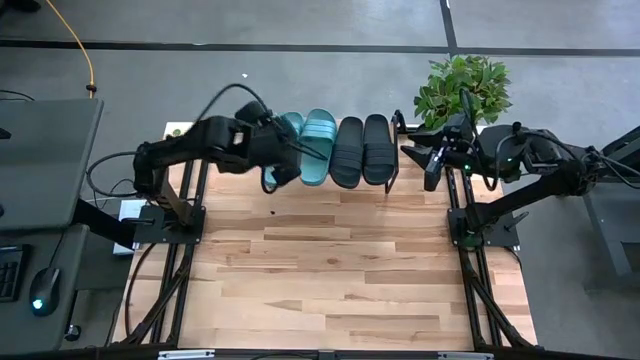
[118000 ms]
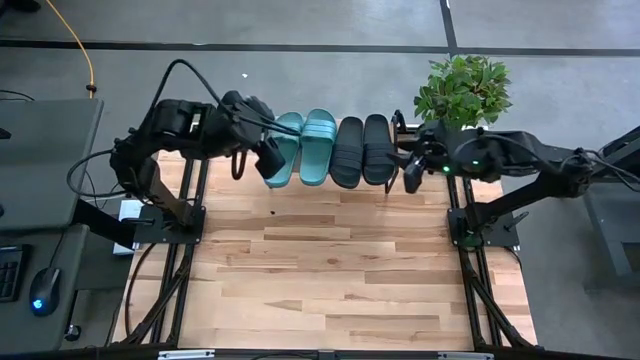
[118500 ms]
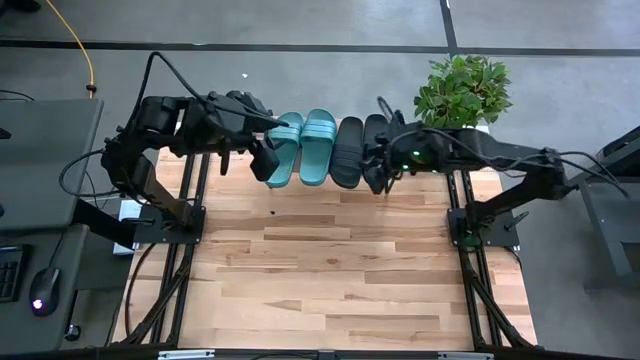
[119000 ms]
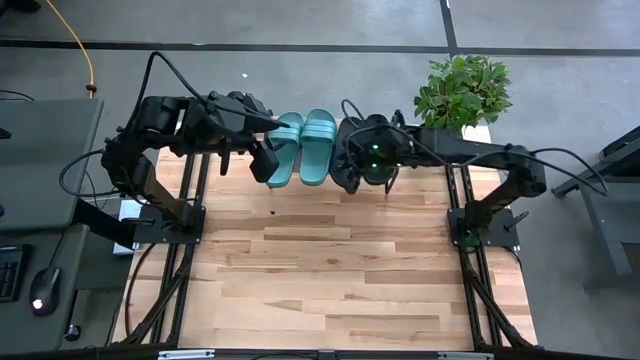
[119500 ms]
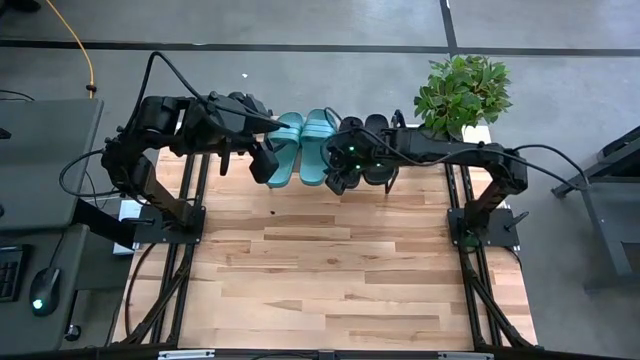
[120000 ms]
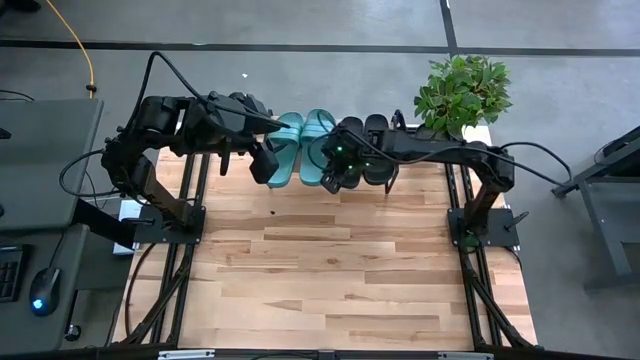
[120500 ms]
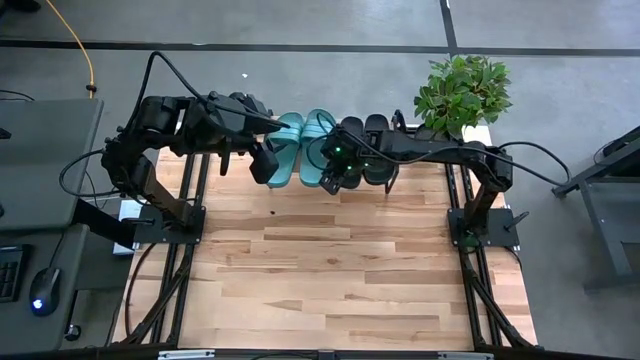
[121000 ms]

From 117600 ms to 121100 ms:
Task: Pick and place slides into the shelf
Adjust the right green slipper on the shelf

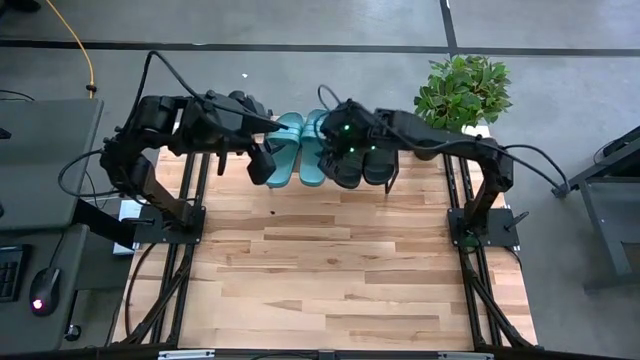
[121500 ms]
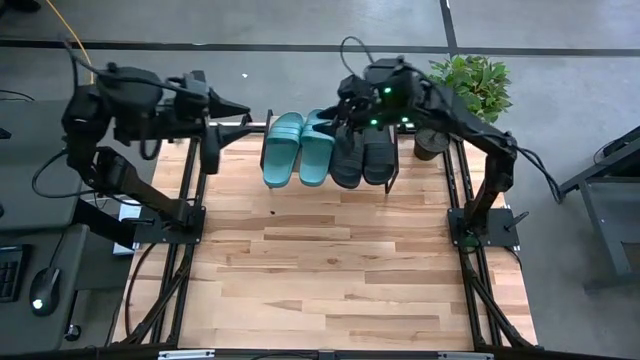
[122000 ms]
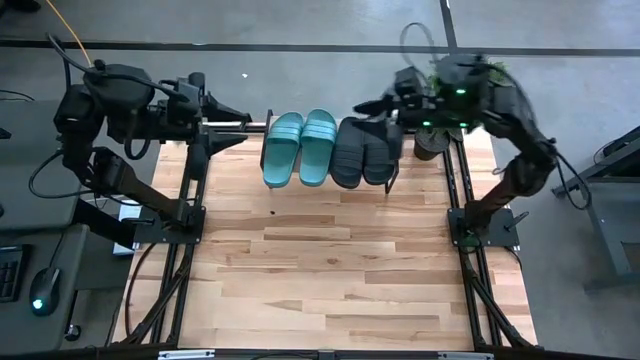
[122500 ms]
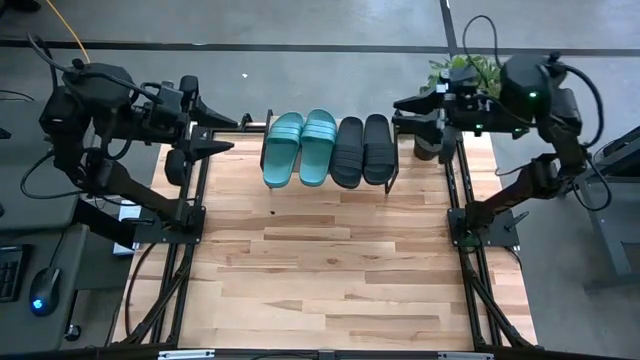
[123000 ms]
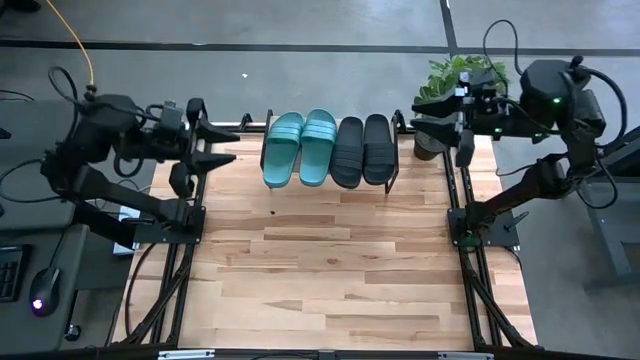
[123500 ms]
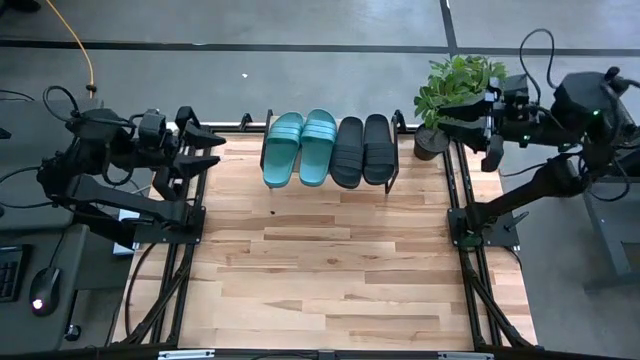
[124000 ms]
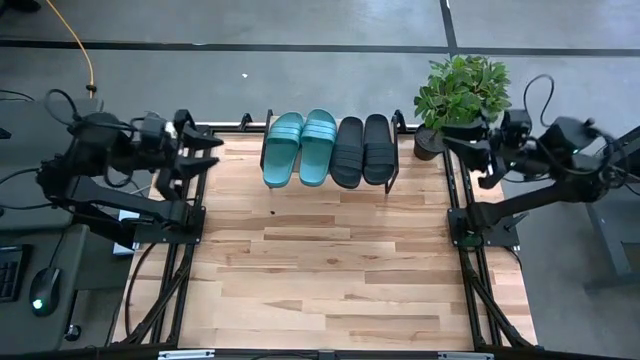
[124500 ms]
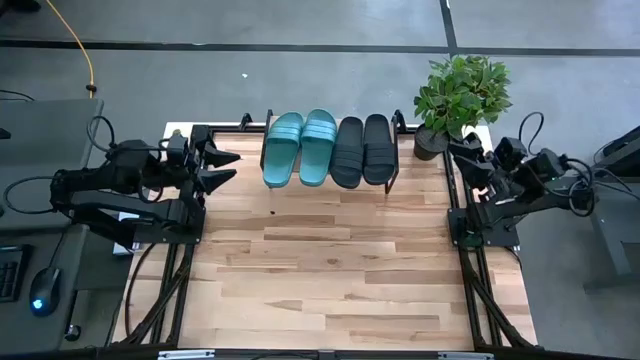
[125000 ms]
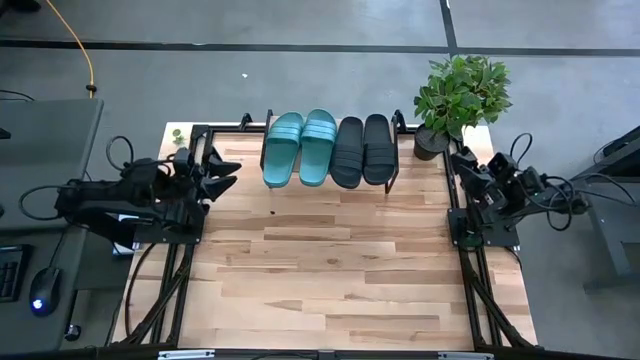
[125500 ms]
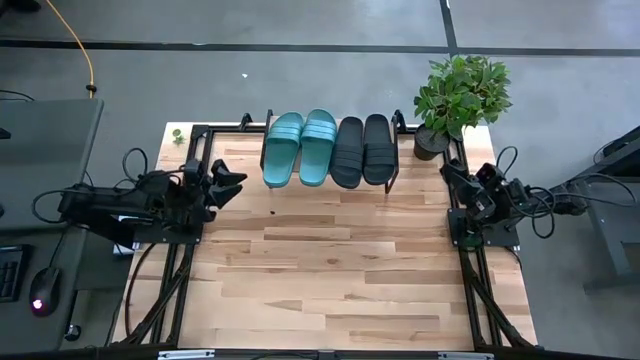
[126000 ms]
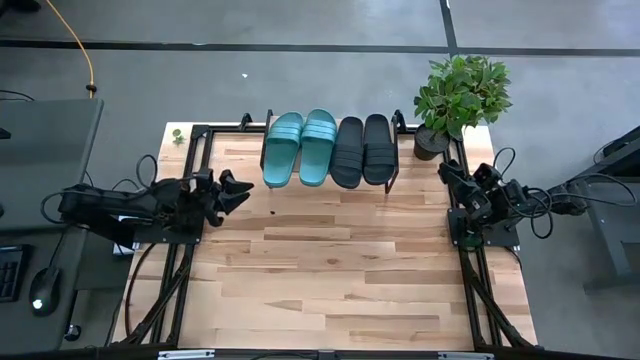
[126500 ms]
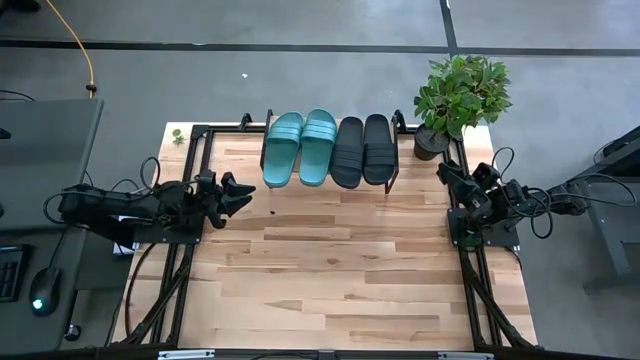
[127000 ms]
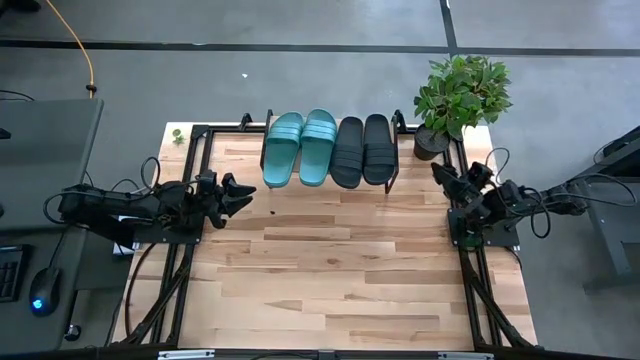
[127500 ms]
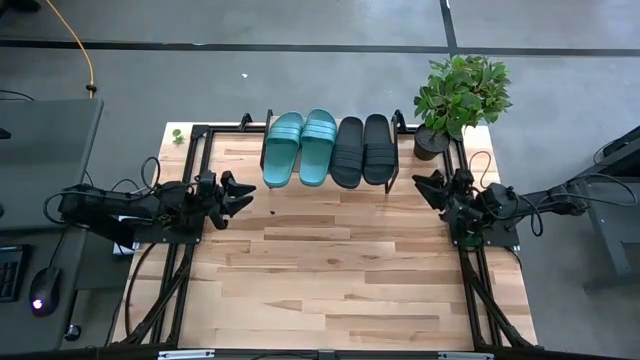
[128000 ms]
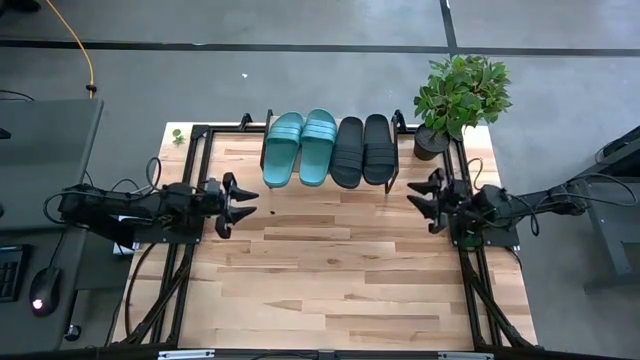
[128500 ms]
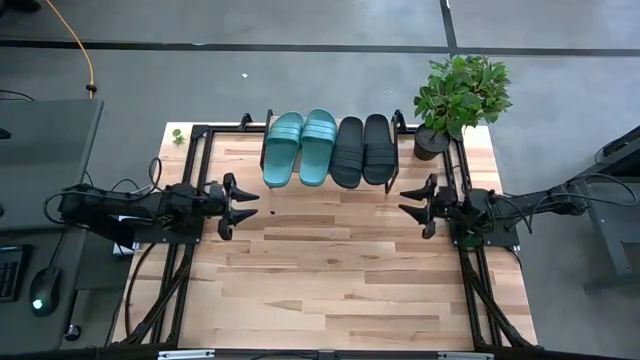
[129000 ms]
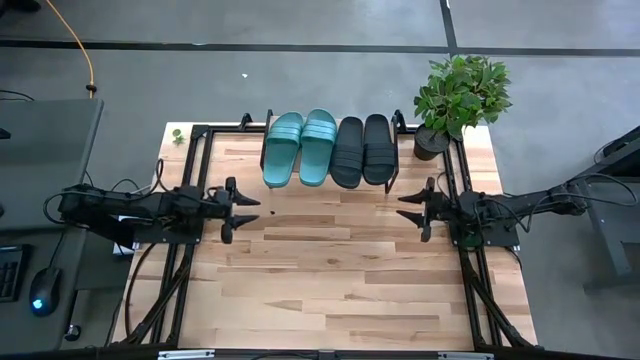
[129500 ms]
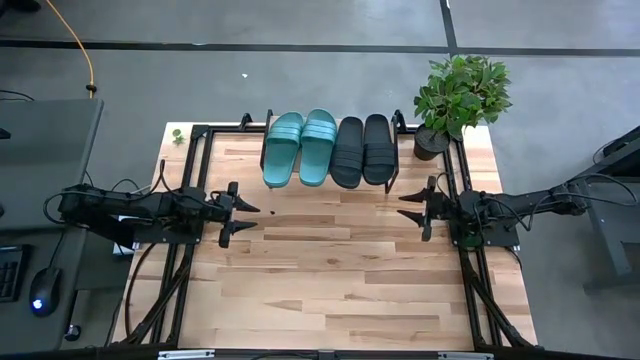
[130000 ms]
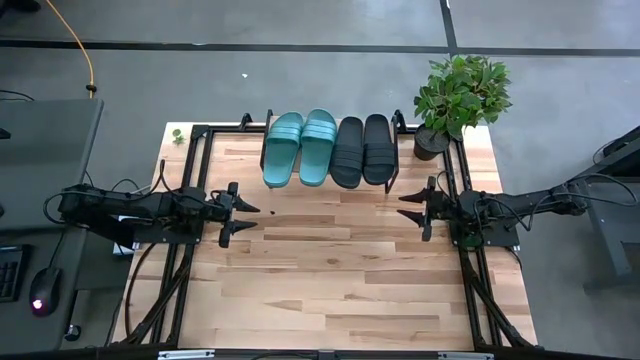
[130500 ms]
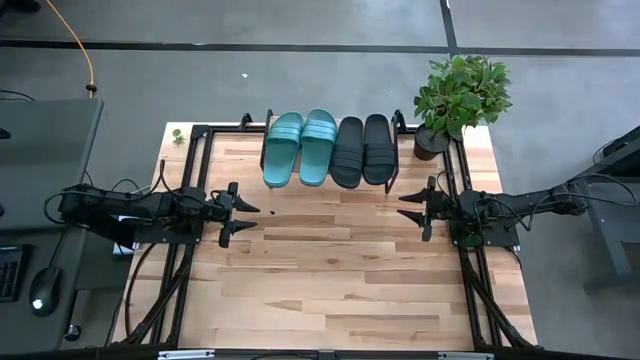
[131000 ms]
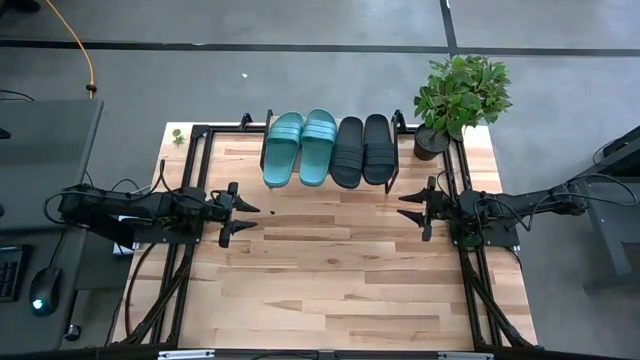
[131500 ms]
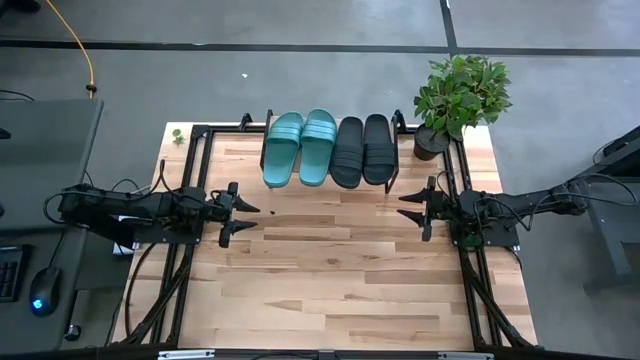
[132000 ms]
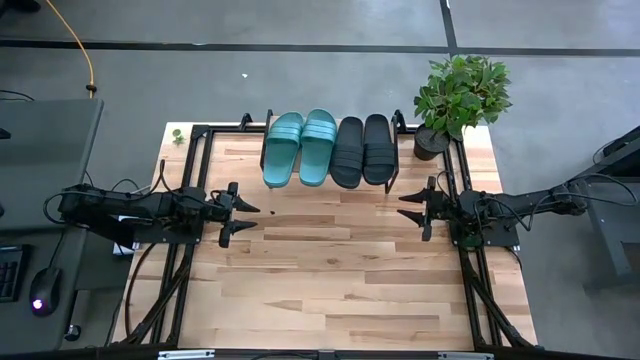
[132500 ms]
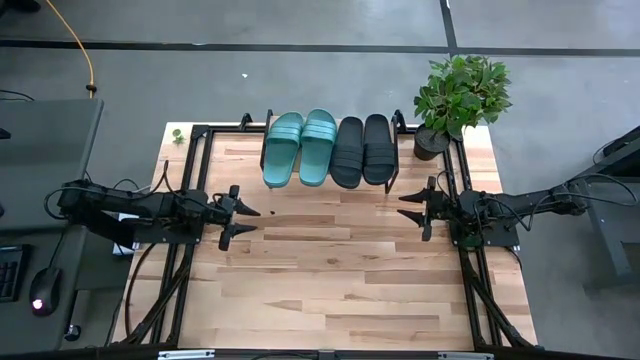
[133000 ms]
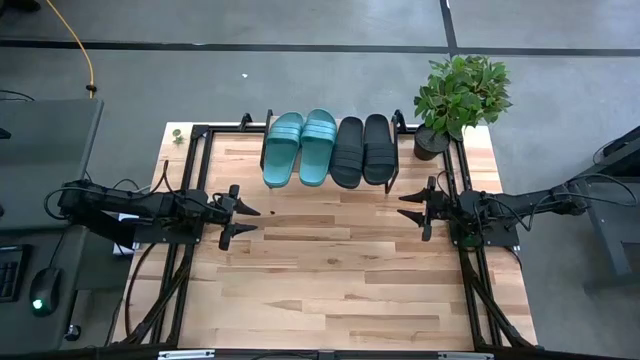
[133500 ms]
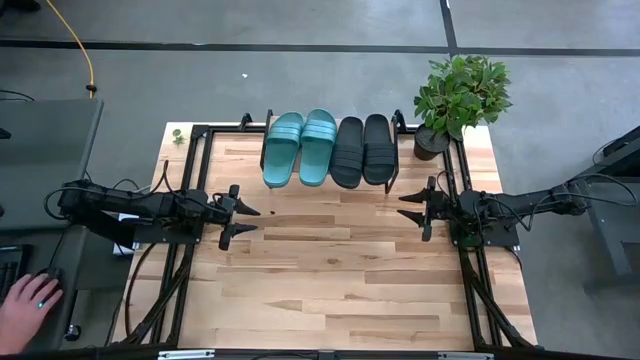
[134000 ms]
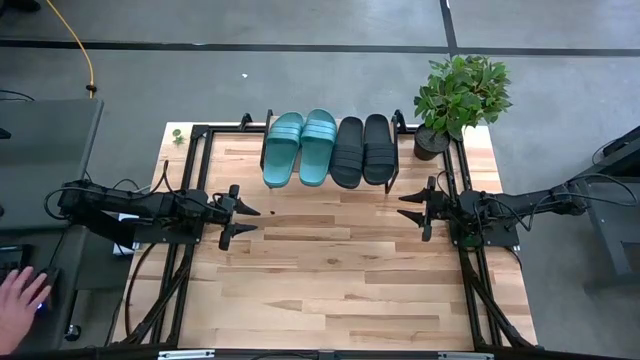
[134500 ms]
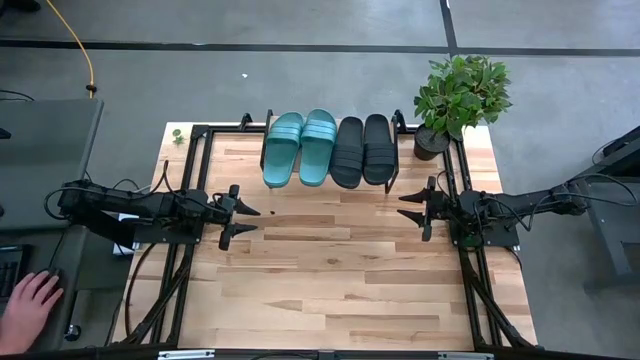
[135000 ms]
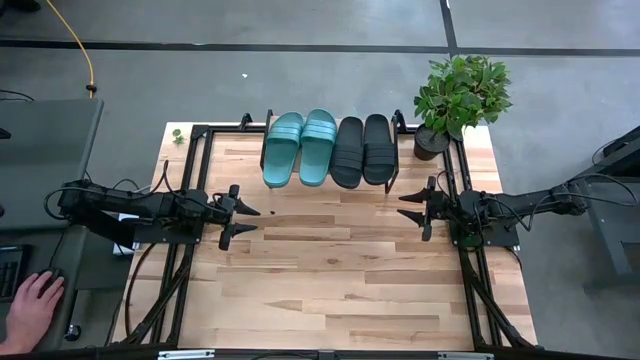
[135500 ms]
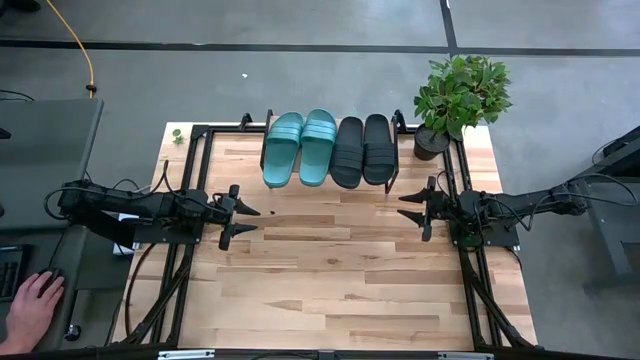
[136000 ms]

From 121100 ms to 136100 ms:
Return to Home Position

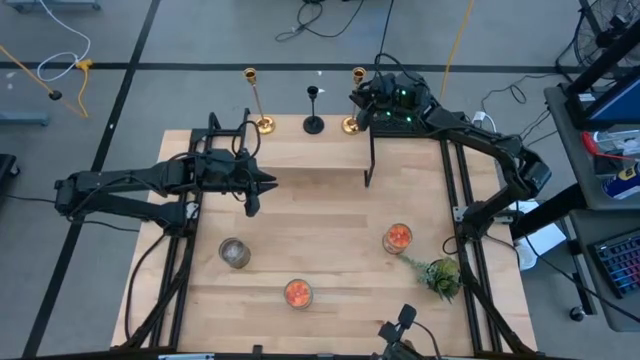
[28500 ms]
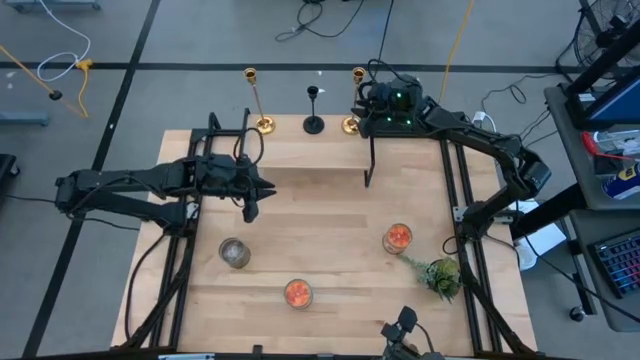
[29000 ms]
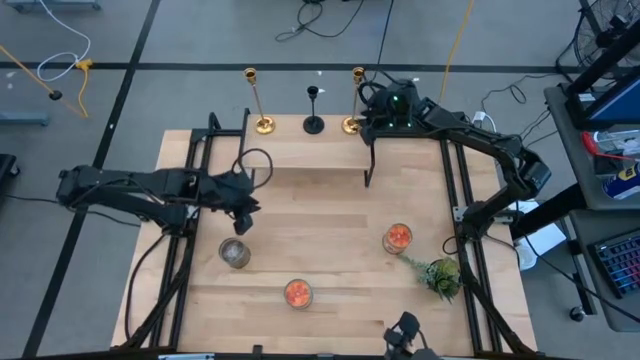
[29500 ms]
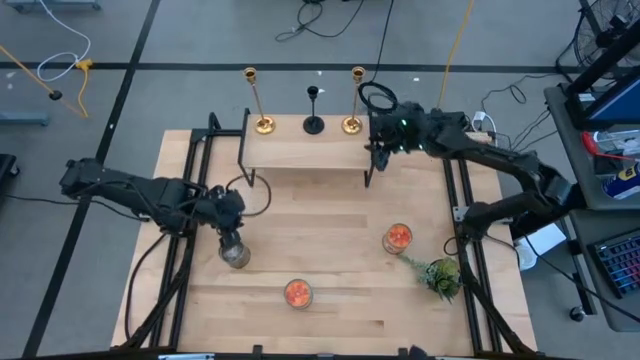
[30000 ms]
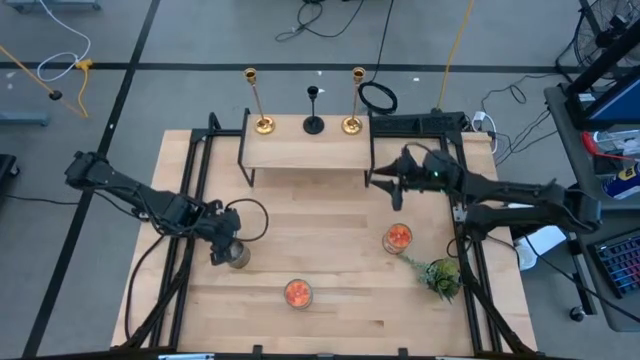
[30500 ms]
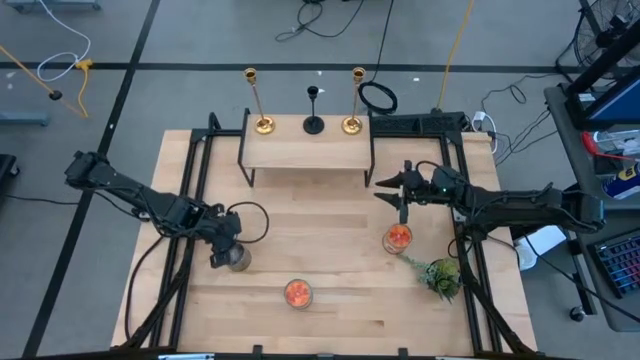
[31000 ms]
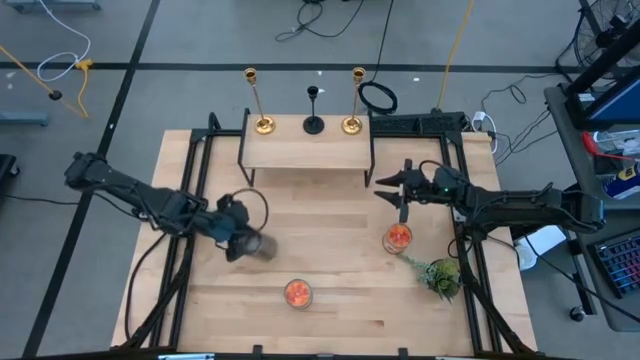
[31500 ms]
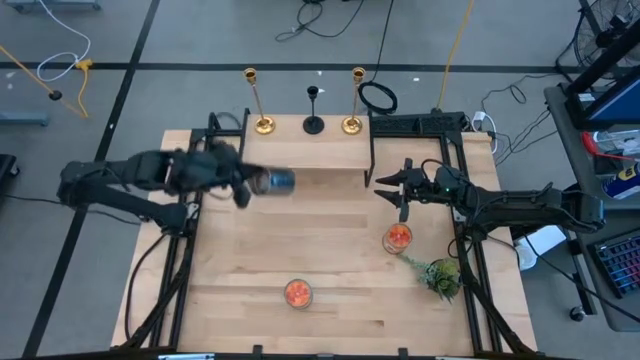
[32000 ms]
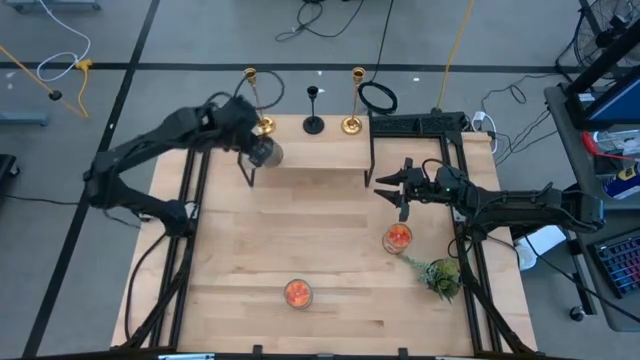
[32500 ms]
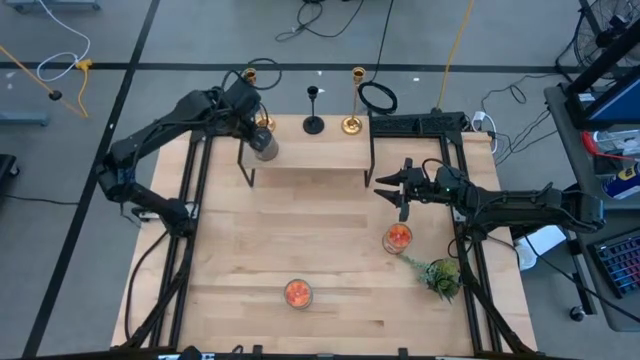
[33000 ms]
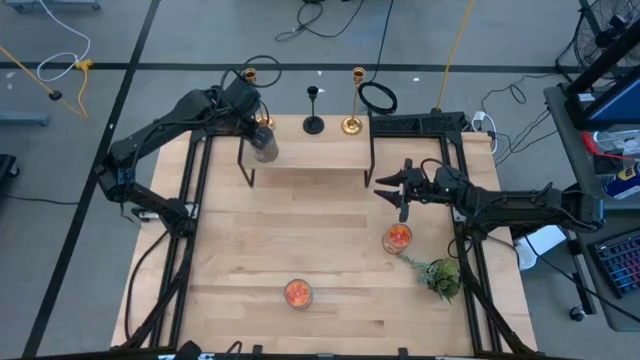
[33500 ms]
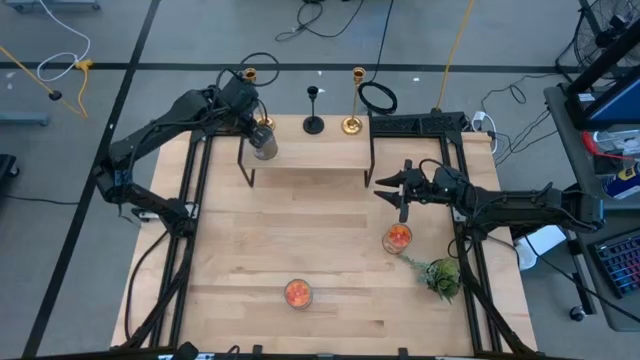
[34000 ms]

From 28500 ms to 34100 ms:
Task: Pick & Place candle stick holders
Put the brown candle on the shelf
